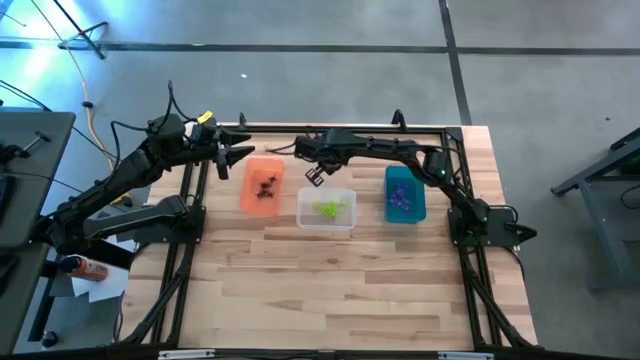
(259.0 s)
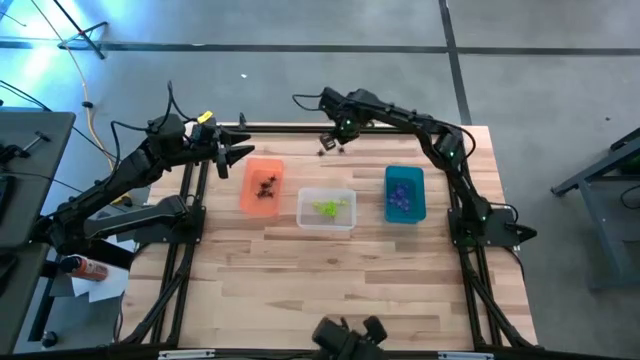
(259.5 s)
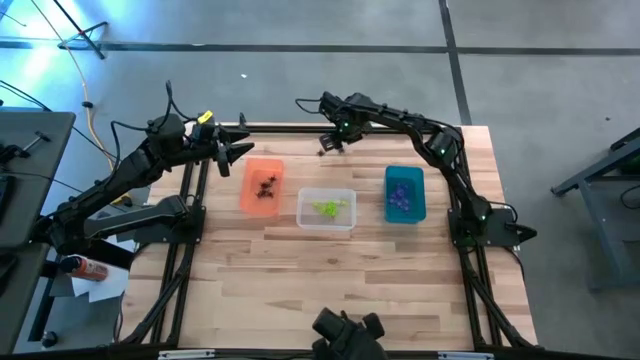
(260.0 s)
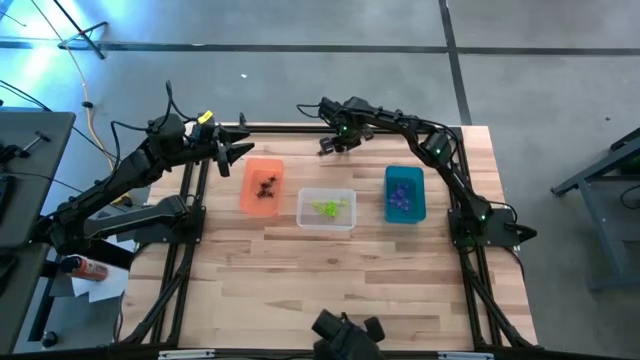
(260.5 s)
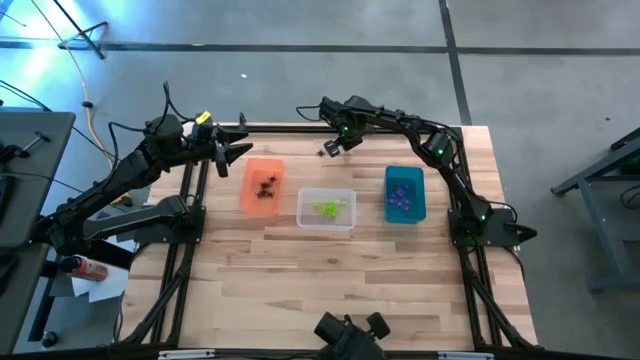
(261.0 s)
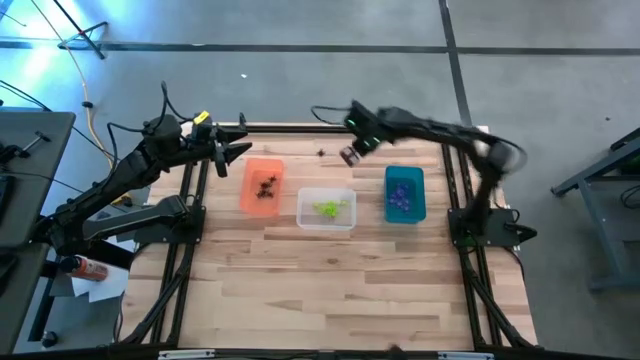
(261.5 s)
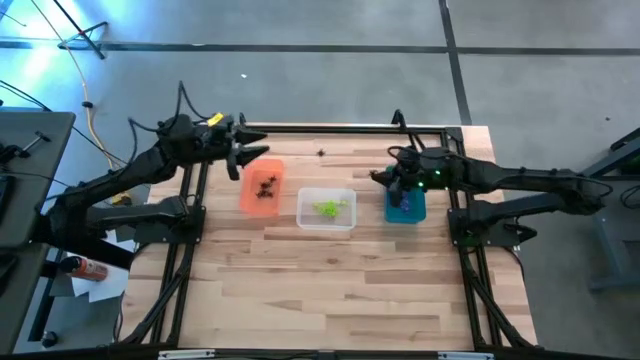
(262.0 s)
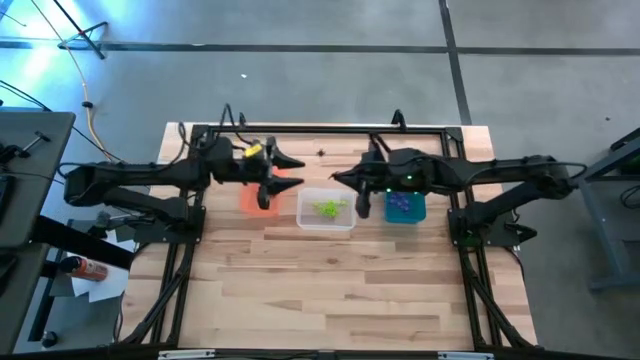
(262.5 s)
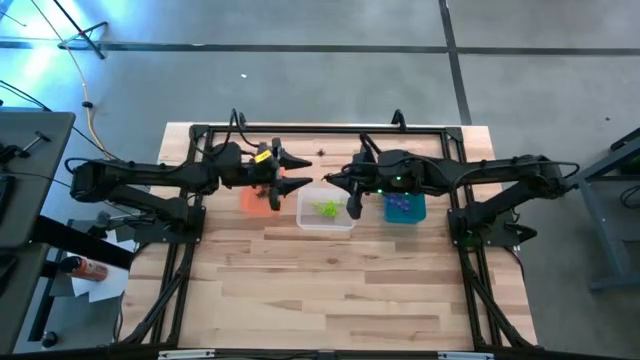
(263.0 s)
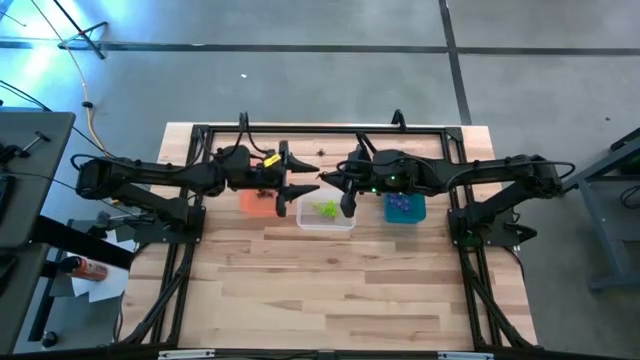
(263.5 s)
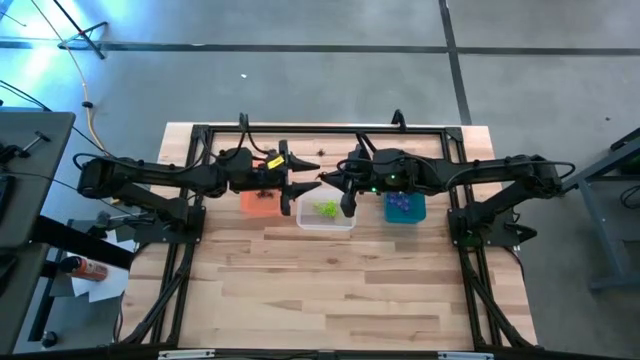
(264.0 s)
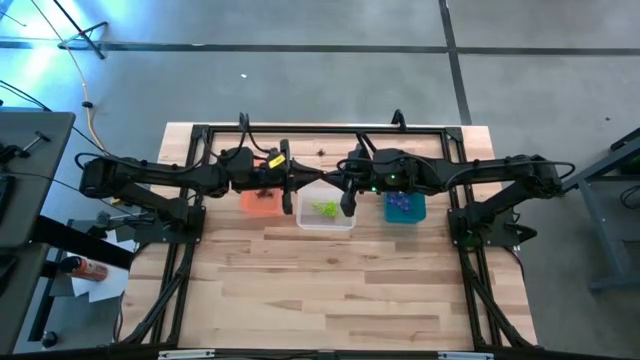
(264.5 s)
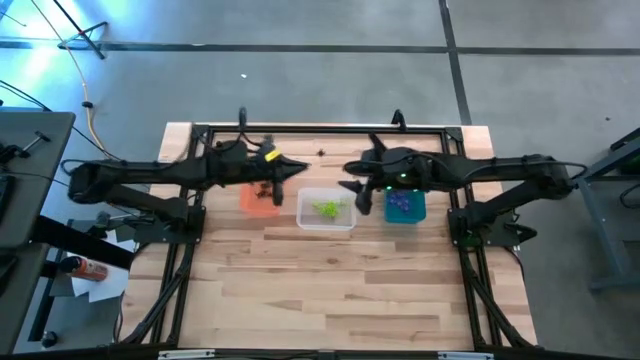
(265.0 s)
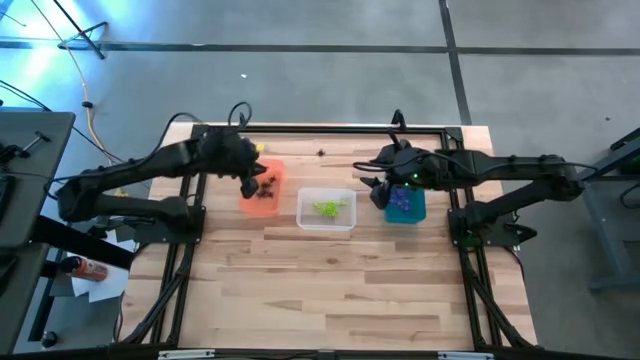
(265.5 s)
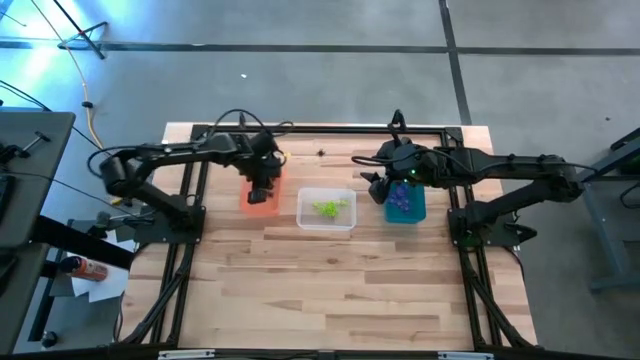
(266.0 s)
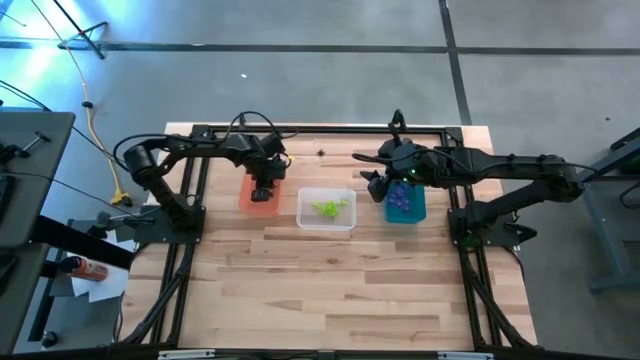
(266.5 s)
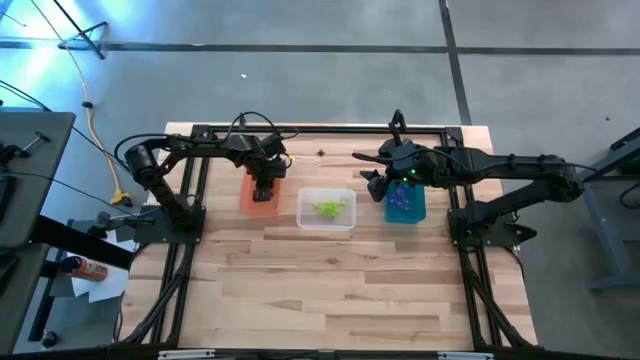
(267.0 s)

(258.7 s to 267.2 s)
Task: Sort Halloween decoration
Put the black spider toy into the orange bin

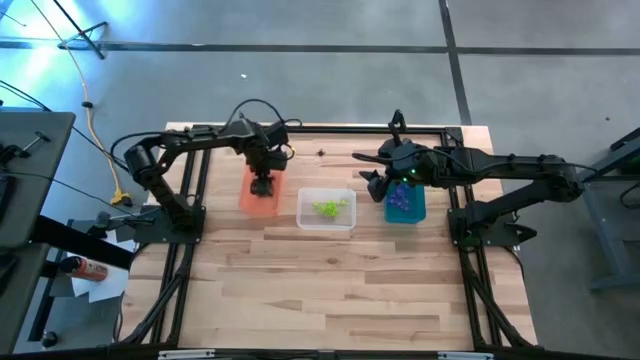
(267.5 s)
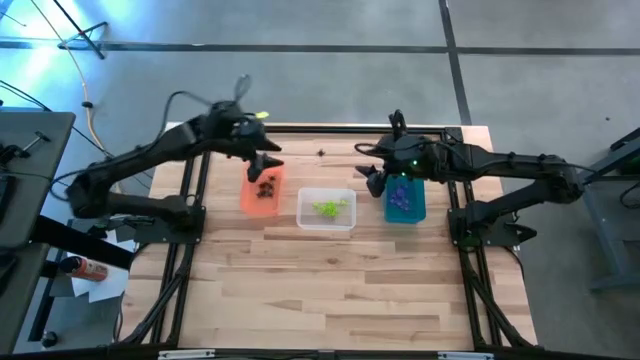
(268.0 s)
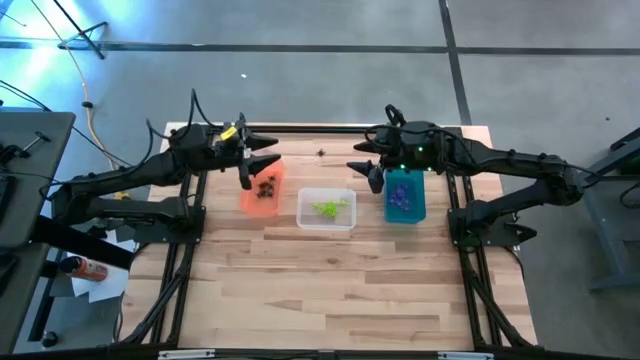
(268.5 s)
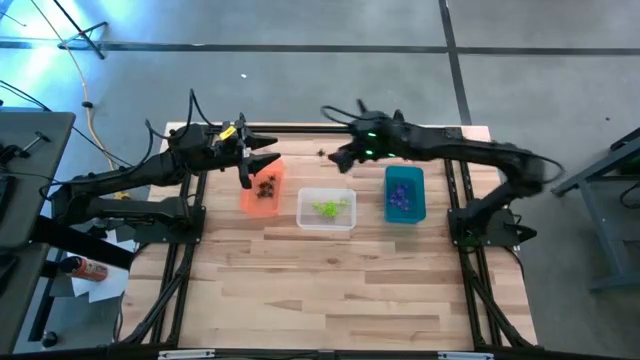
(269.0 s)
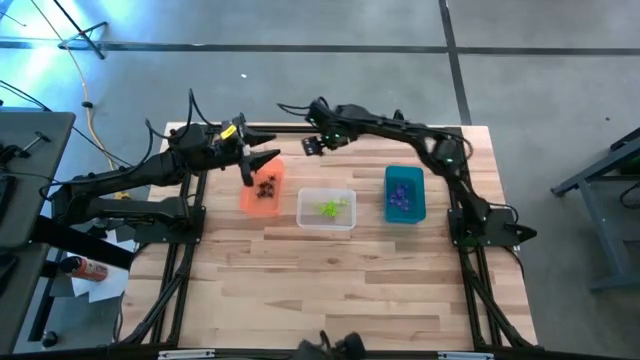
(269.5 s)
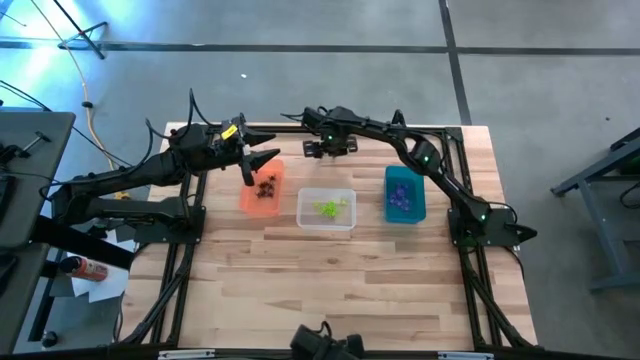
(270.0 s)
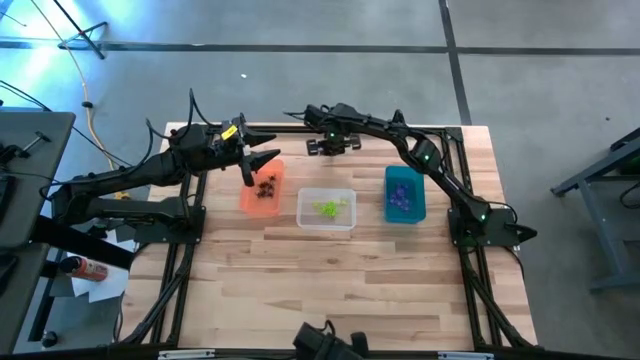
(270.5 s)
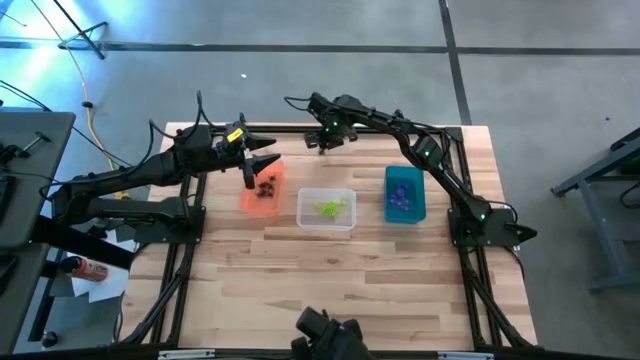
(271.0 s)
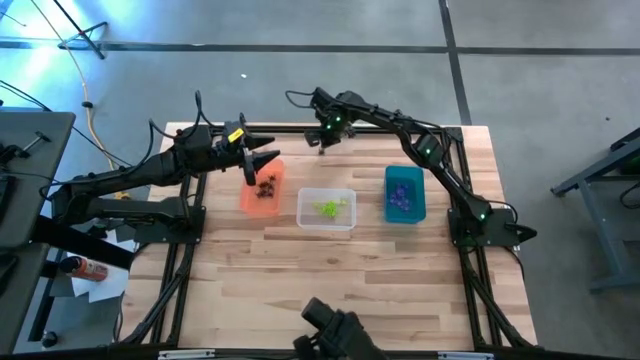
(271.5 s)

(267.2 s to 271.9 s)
Put the black spider toy into the orange bin

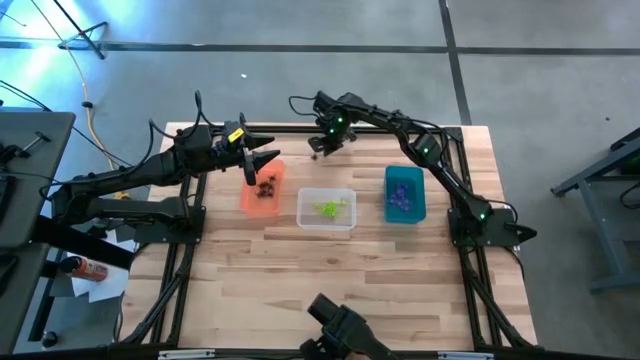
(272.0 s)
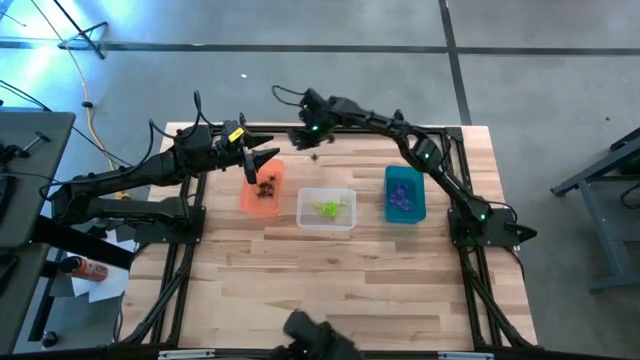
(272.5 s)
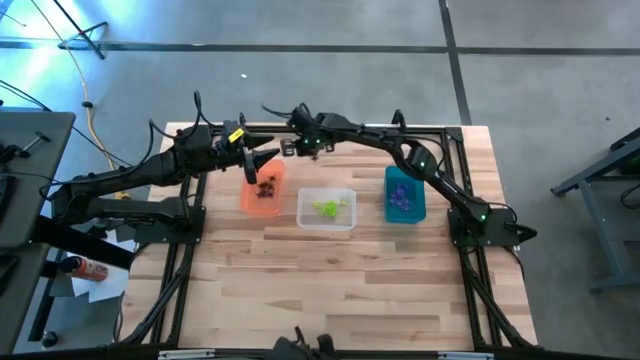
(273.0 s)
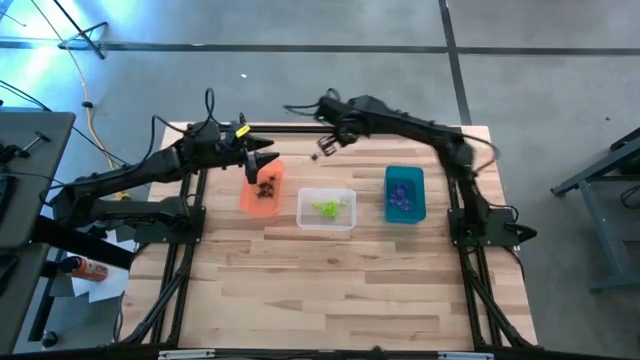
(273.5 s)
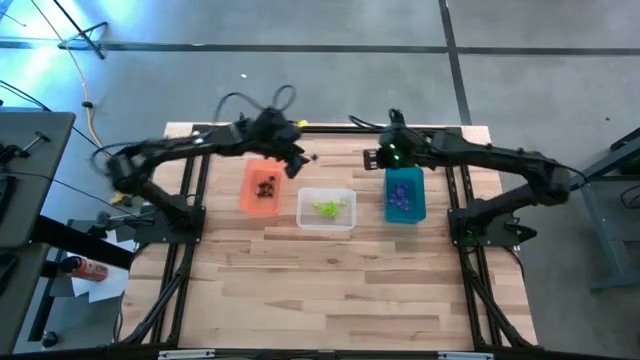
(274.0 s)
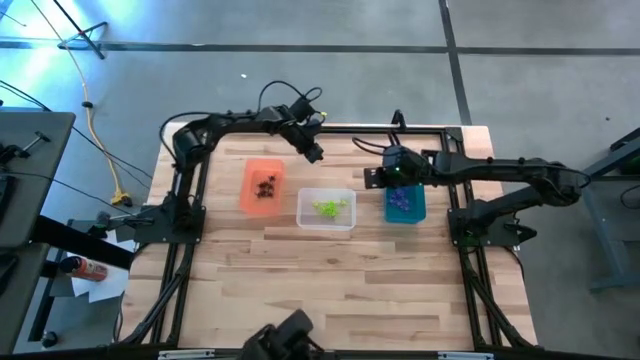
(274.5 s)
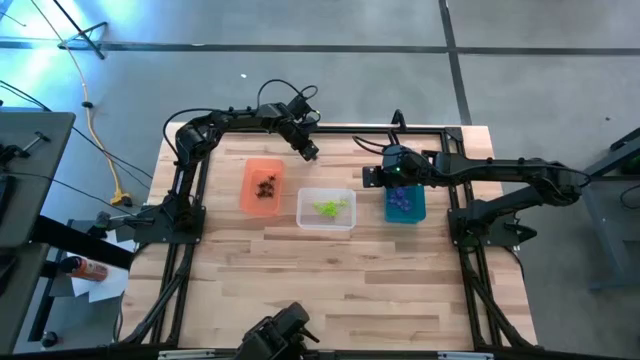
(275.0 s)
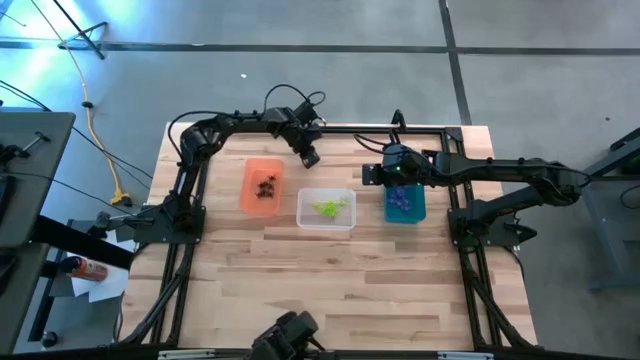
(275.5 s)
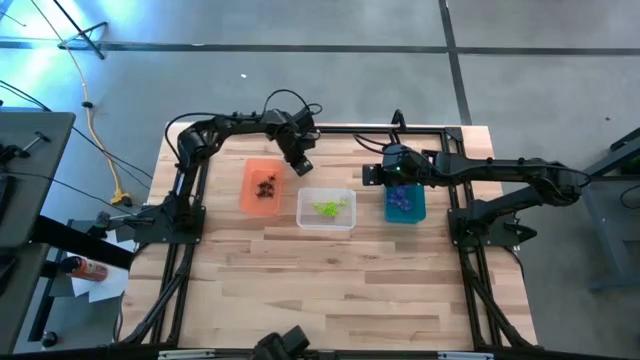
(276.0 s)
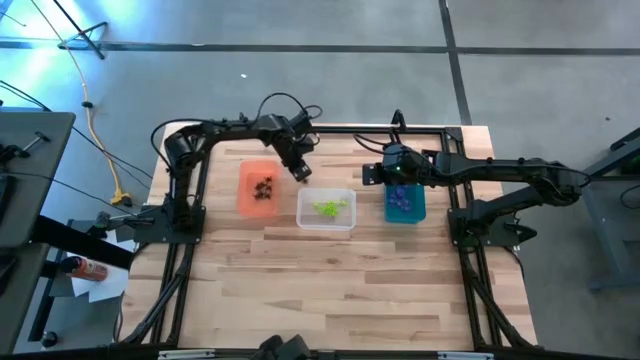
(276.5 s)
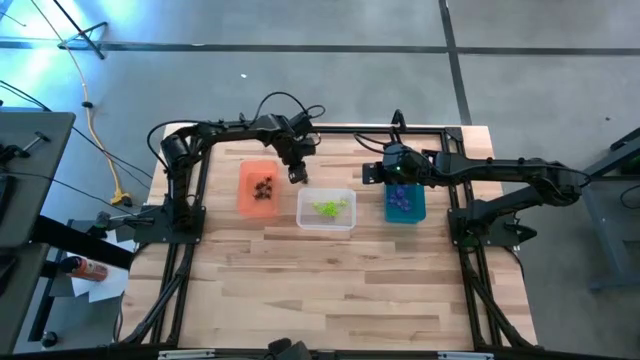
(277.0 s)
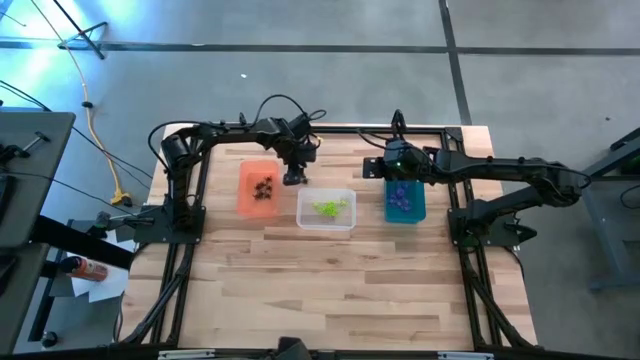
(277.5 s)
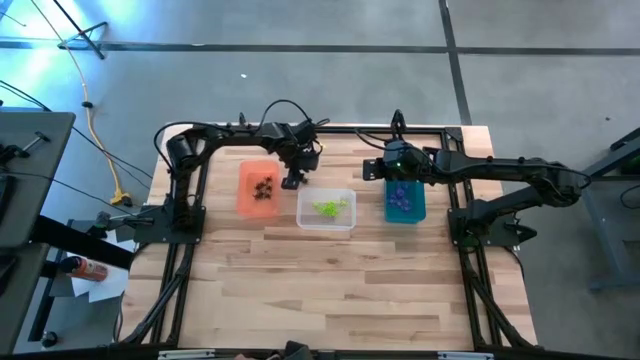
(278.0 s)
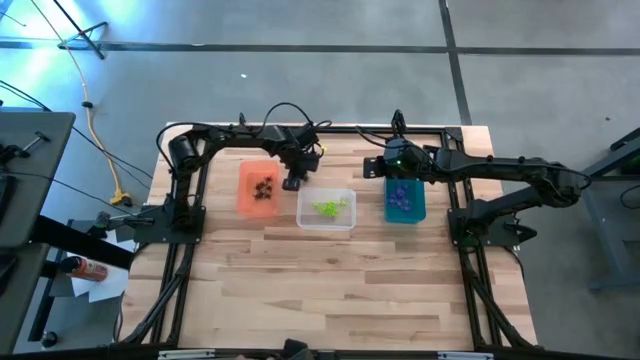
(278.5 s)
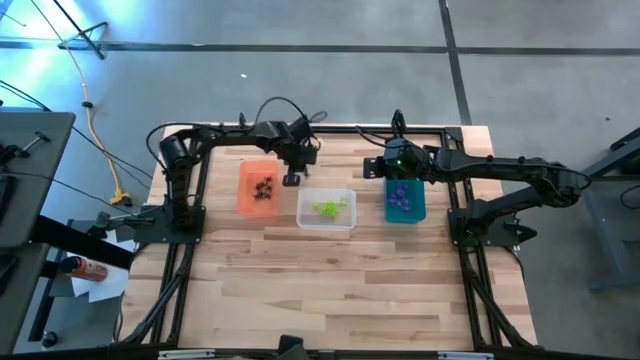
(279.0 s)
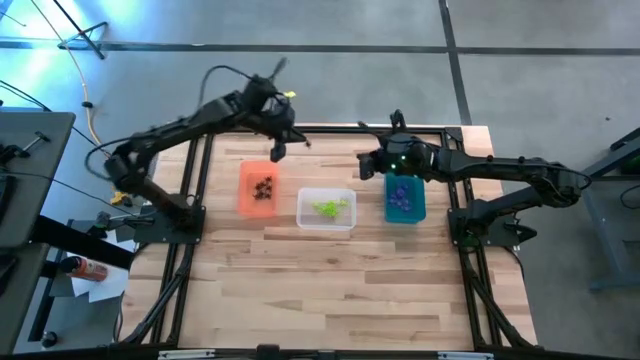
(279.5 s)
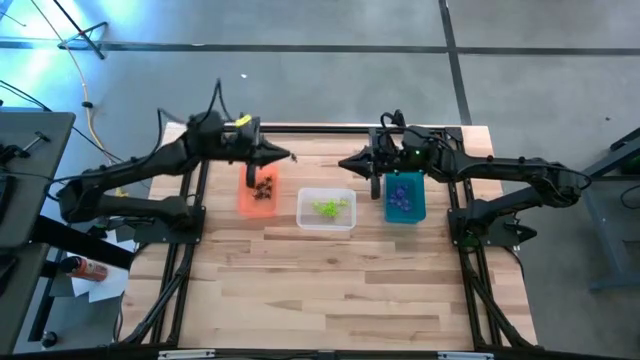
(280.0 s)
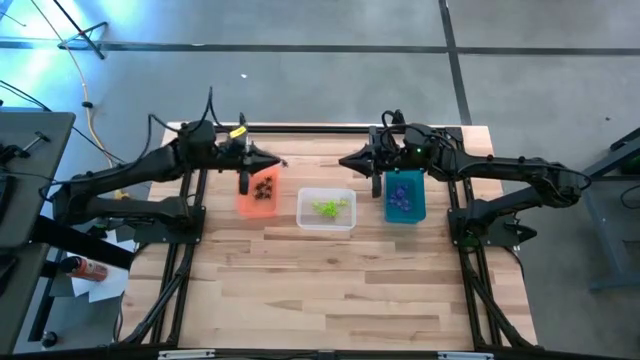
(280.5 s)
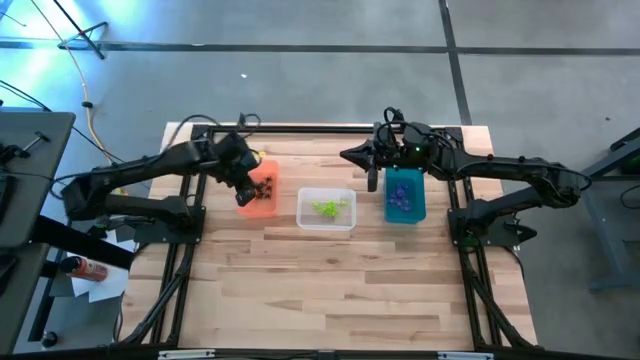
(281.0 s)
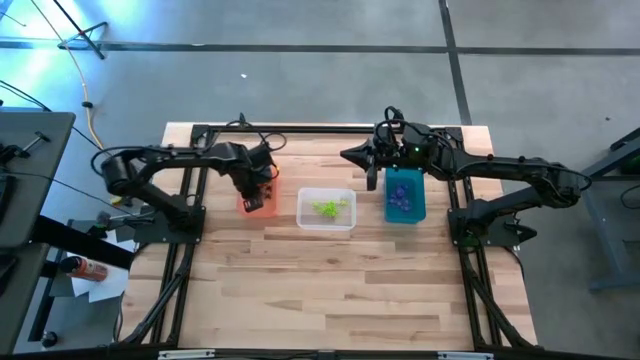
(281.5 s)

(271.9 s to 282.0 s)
Put the black spider toy into the orange bin
